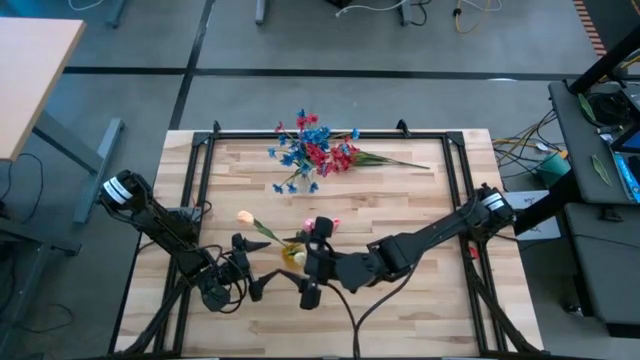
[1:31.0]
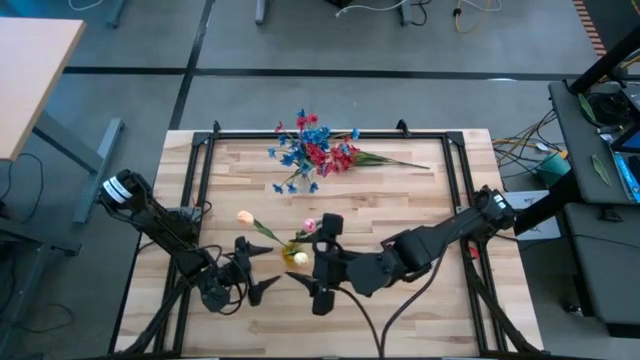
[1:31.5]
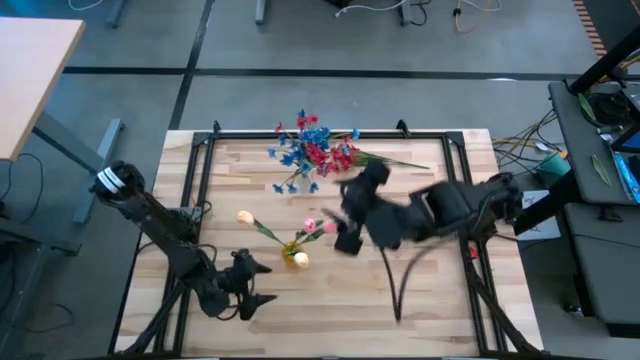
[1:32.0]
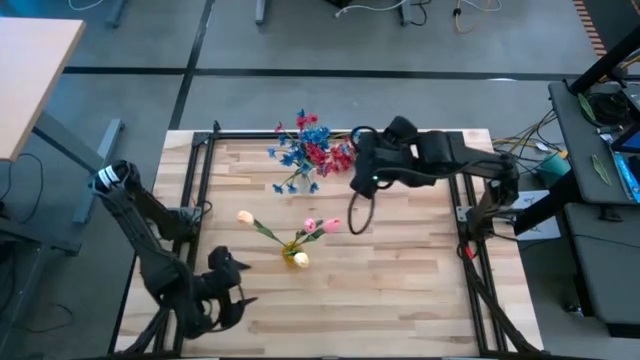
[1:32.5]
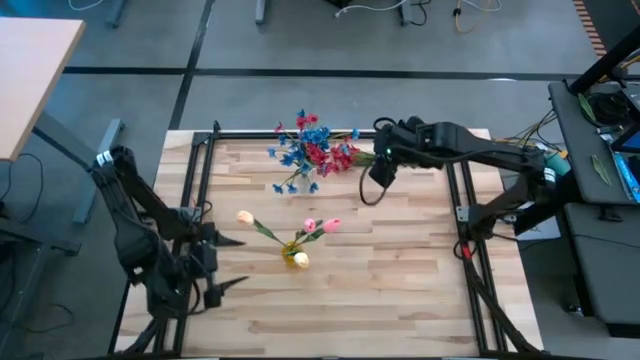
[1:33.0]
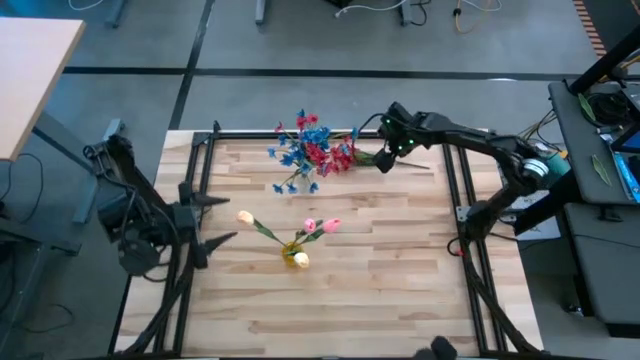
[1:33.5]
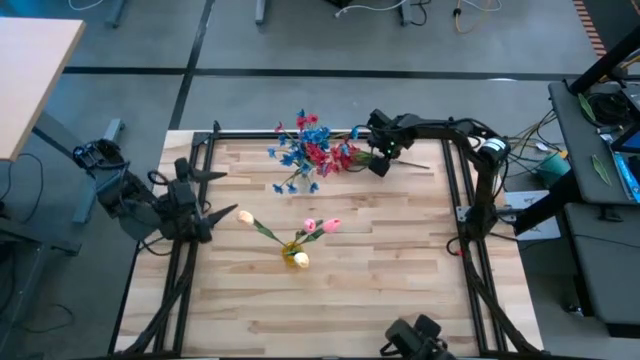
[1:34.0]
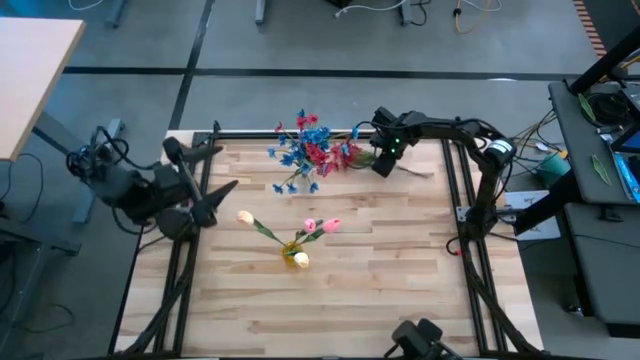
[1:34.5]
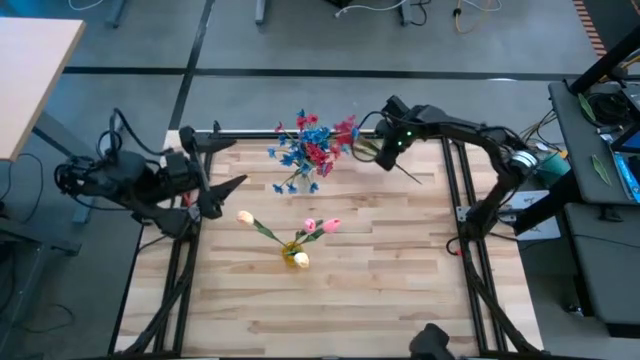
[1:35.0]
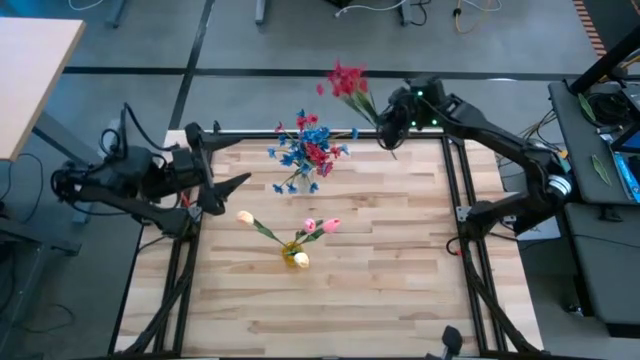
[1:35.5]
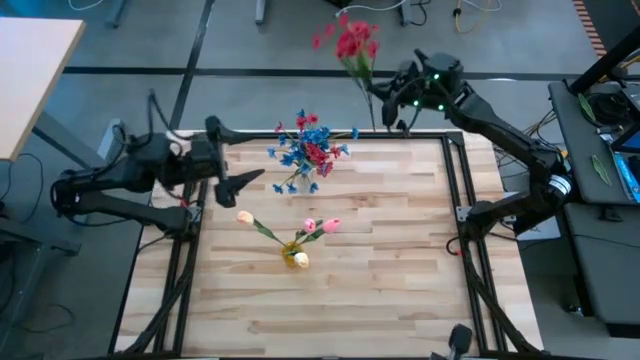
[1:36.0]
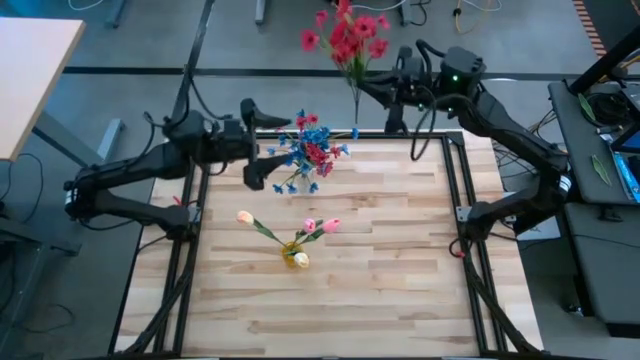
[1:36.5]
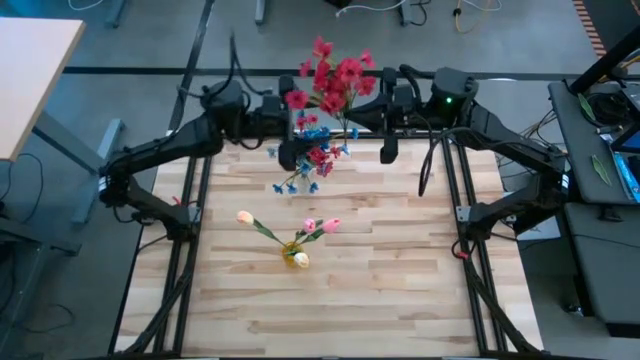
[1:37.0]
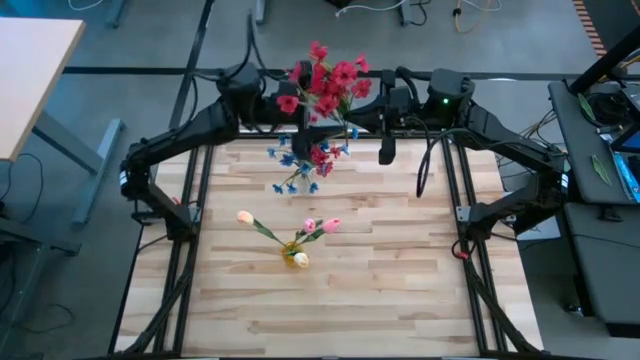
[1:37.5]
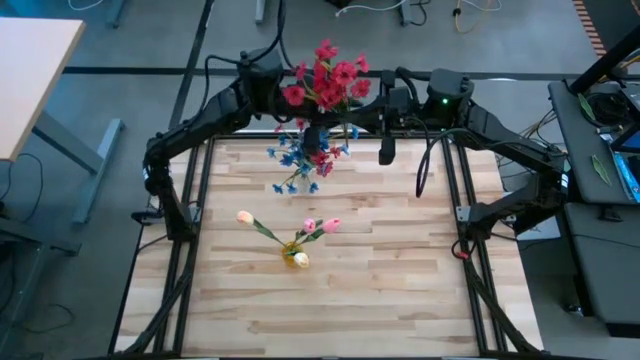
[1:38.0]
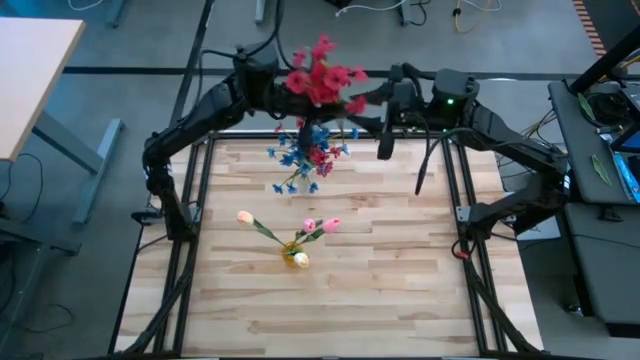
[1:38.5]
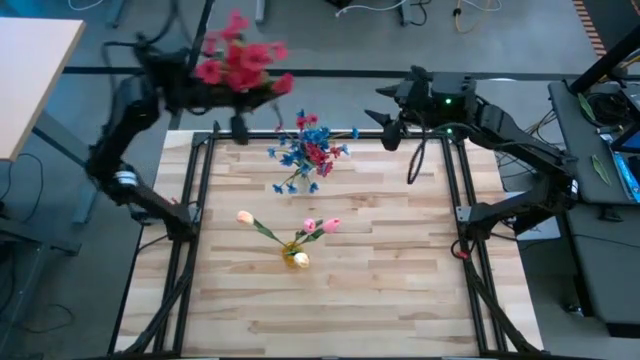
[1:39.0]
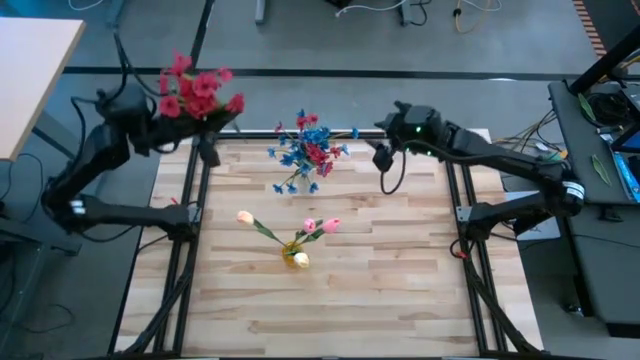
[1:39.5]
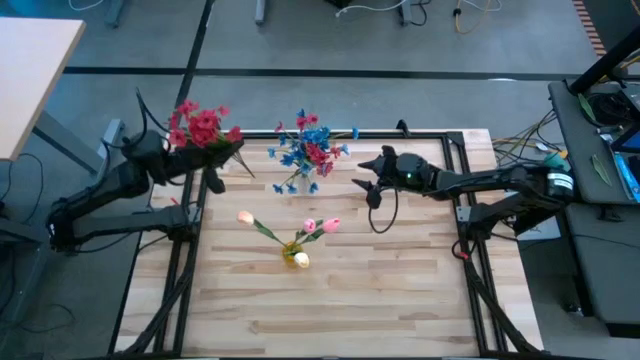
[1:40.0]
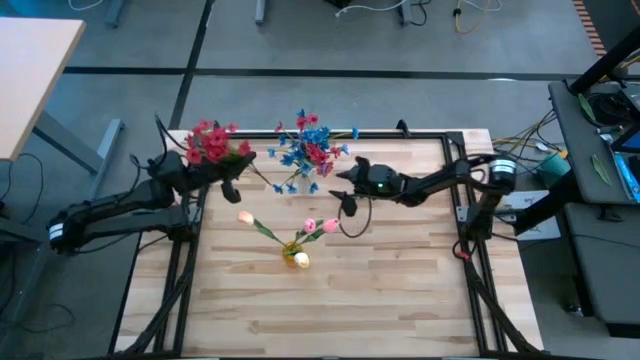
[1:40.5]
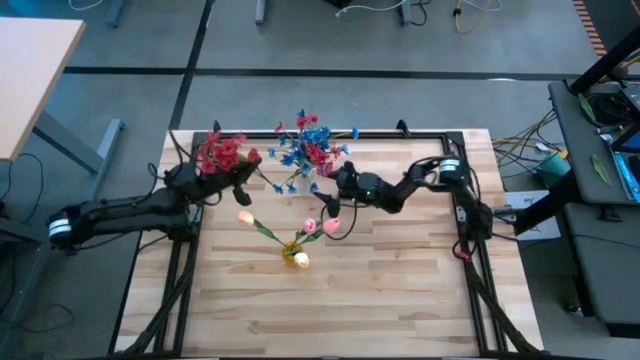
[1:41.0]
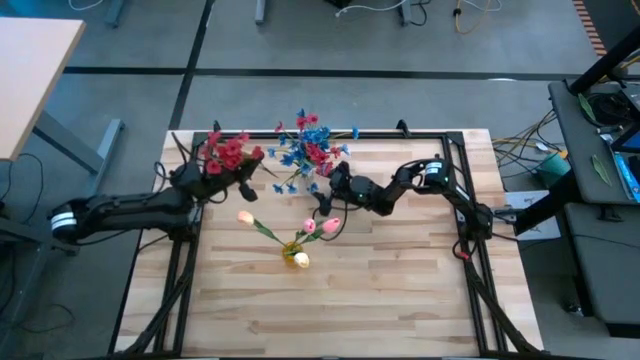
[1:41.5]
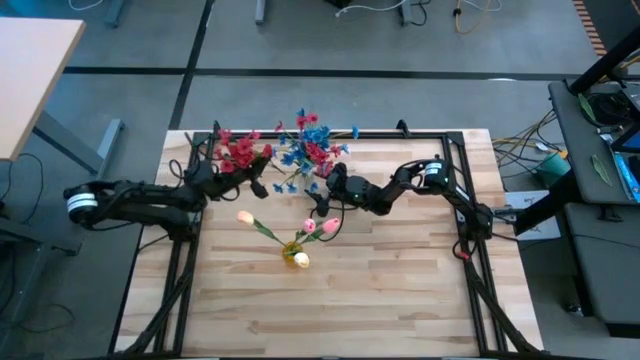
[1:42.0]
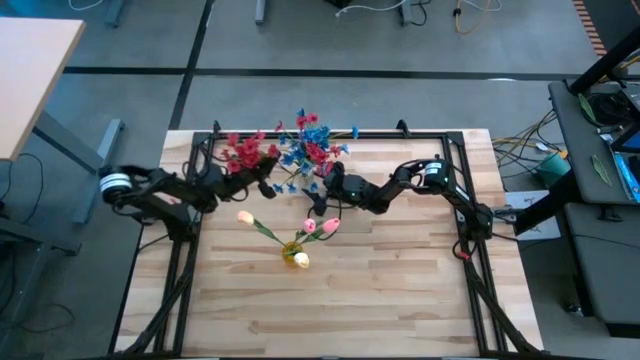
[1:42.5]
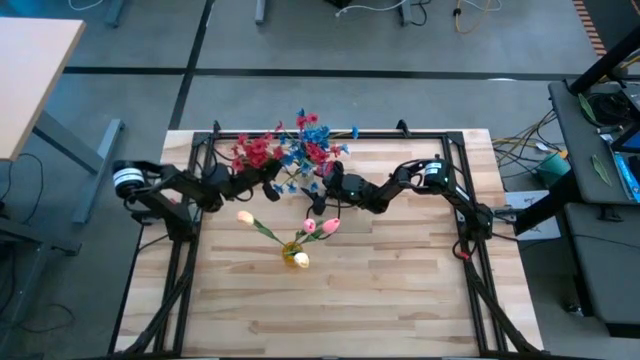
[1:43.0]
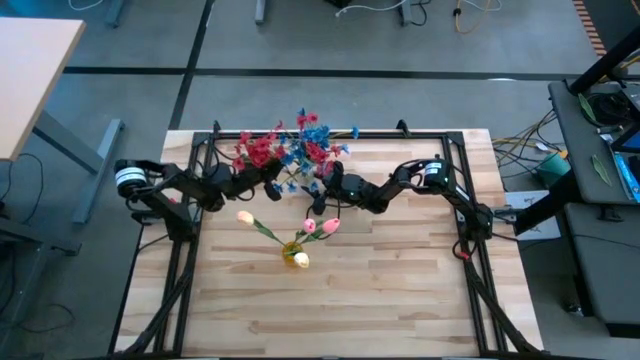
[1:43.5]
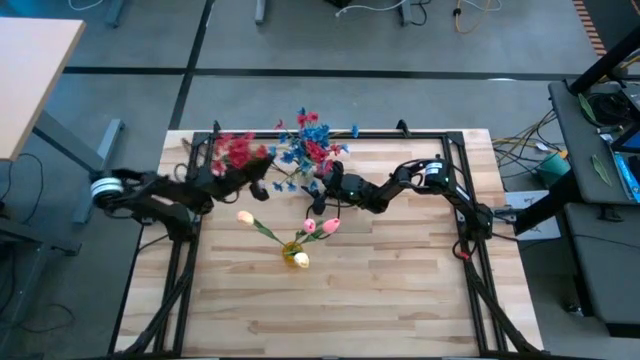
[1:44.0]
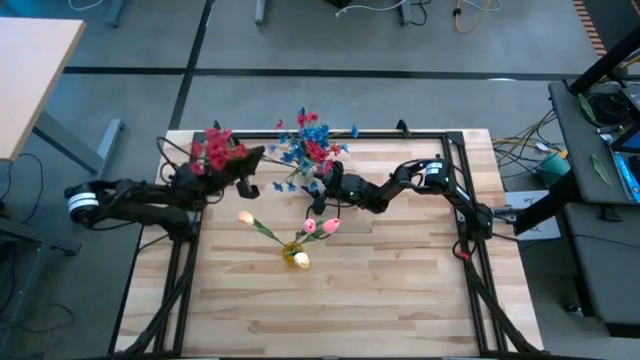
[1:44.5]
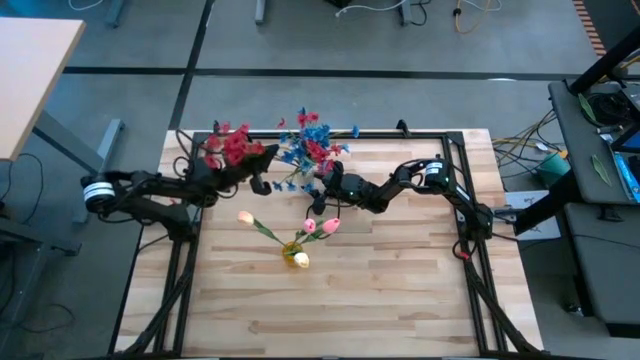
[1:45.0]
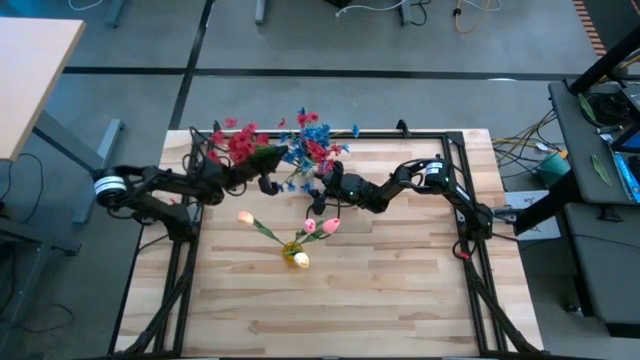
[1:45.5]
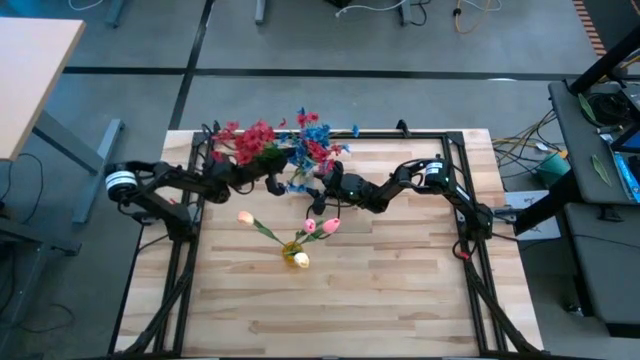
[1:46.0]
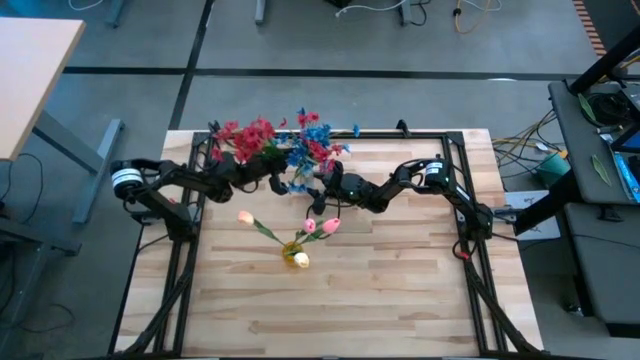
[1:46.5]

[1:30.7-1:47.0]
Task: Sort flowers into vase by color
Put the red flowers into the transparent vase

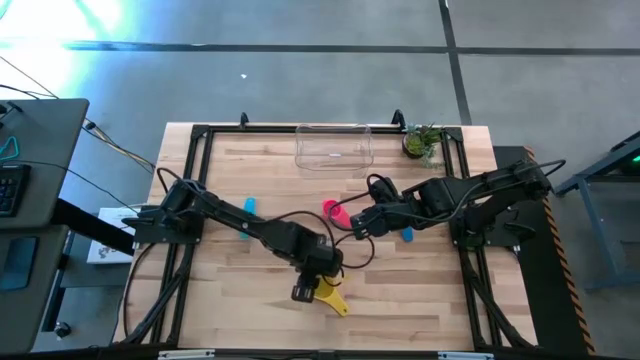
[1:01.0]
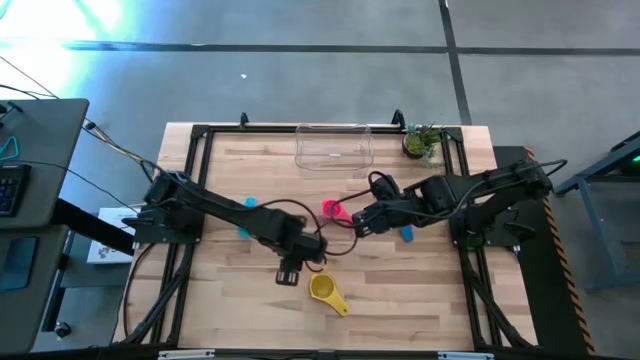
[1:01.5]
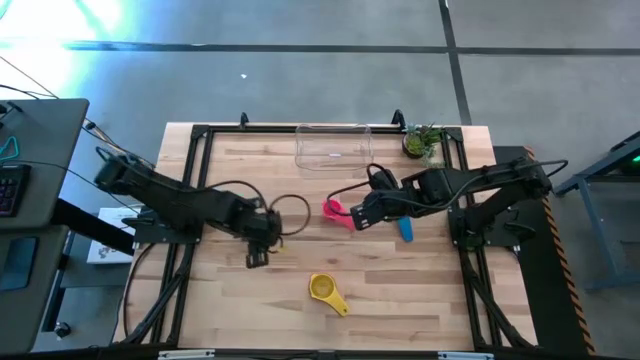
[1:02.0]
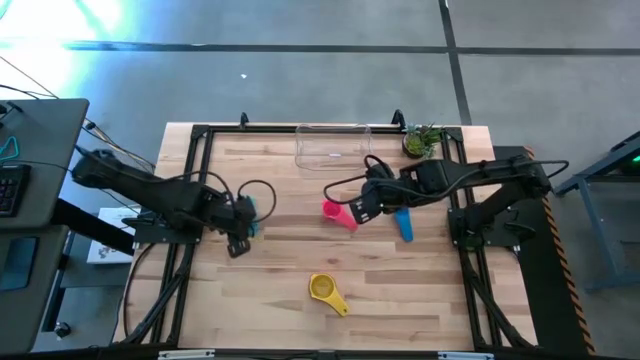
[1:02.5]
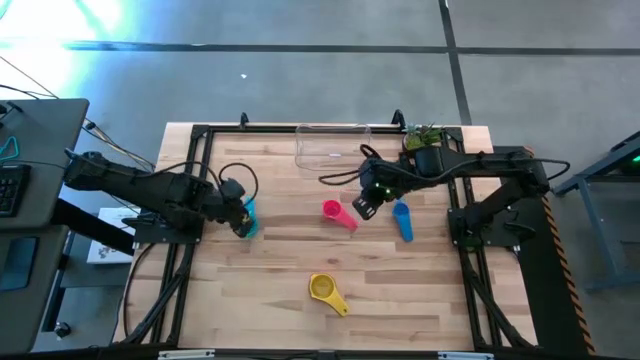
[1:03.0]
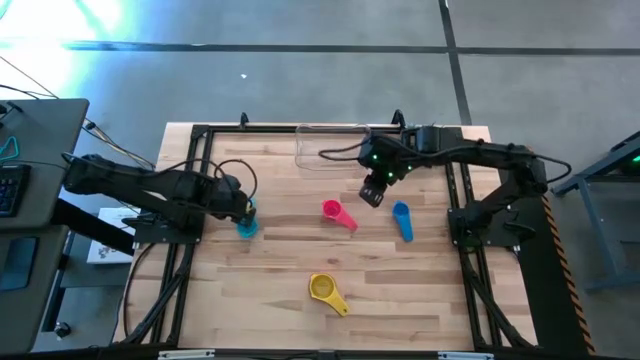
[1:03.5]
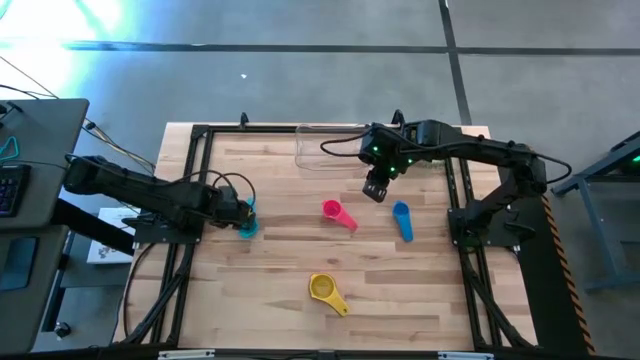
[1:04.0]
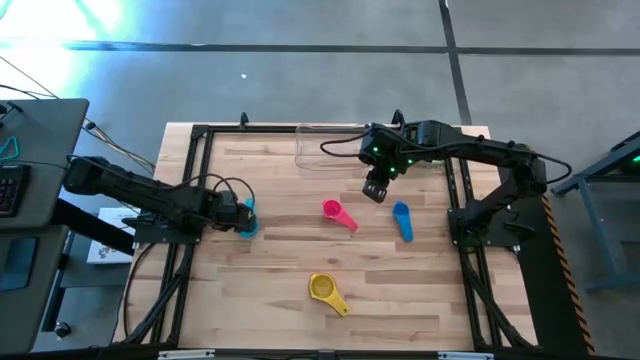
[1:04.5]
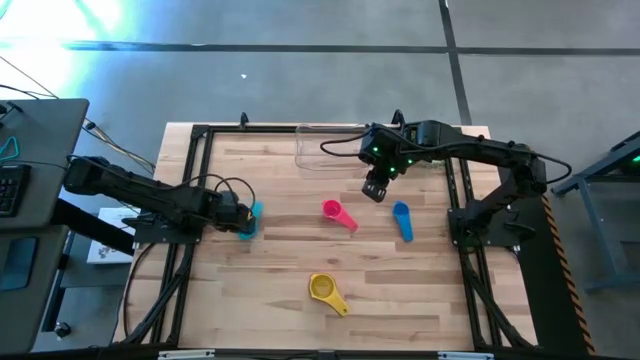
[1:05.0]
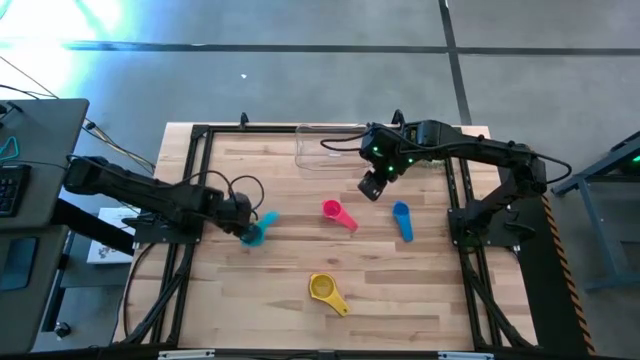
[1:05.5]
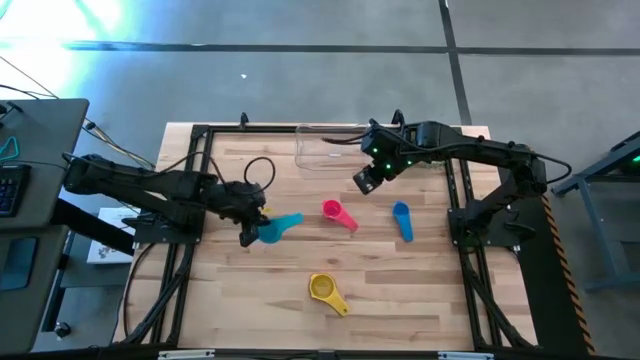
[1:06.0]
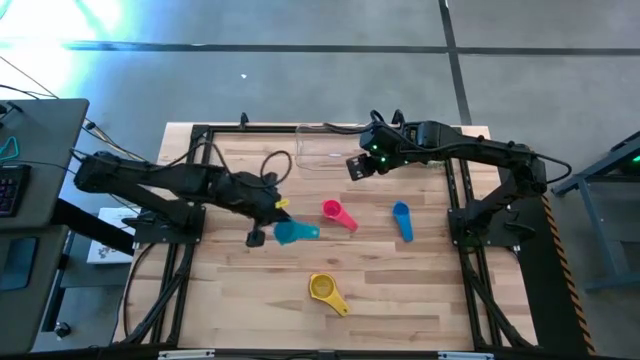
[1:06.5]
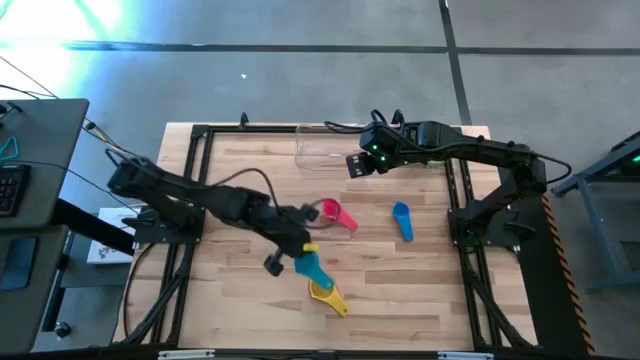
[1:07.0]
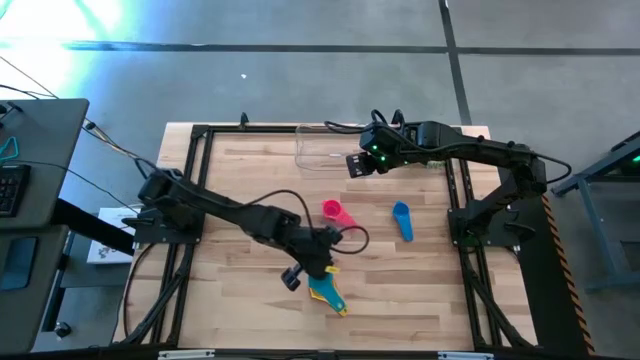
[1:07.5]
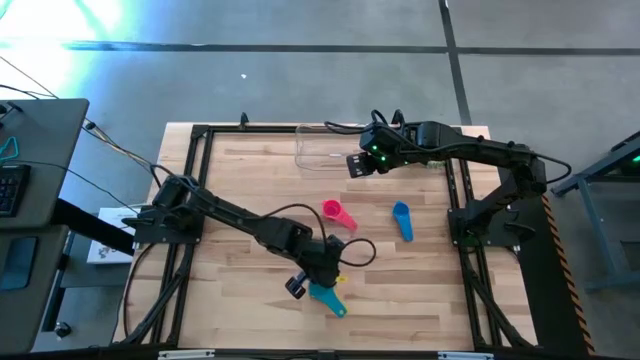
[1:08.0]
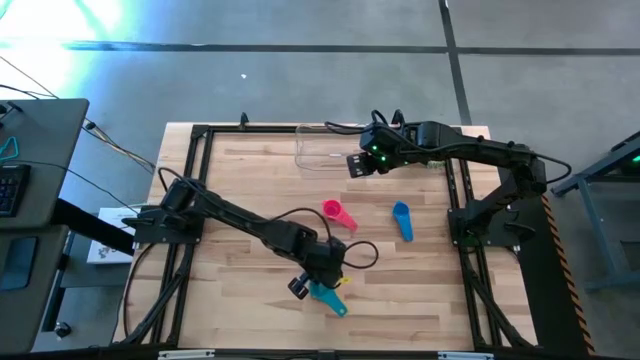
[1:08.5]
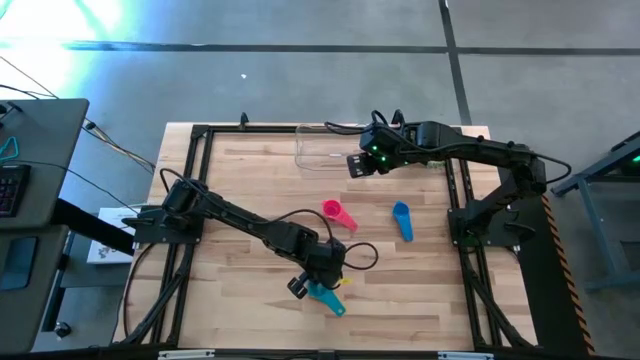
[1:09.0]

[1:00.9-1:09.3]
Task: Nest measuring cups in basket
Stack the light blue measuring cup on the yellow measuring cup
